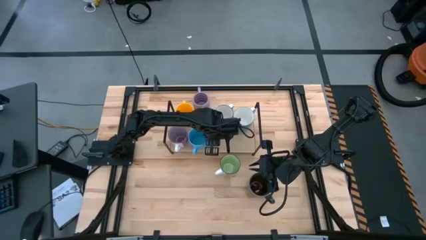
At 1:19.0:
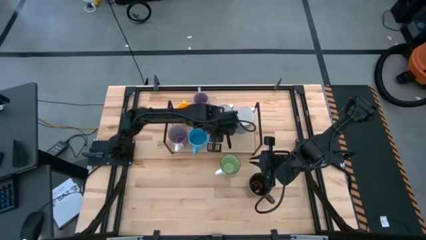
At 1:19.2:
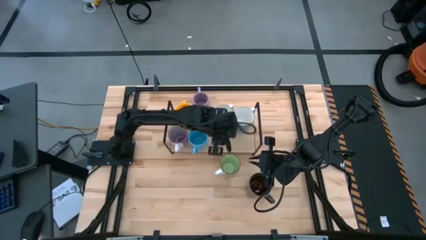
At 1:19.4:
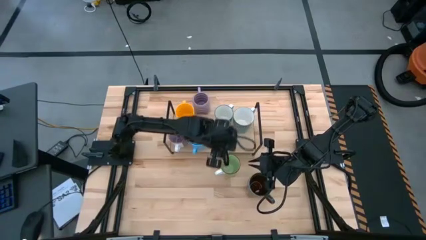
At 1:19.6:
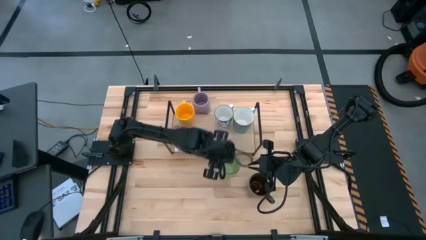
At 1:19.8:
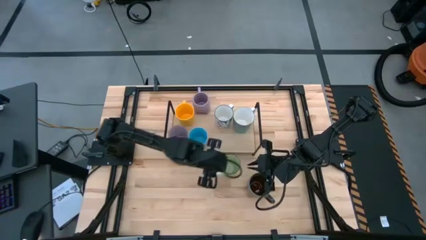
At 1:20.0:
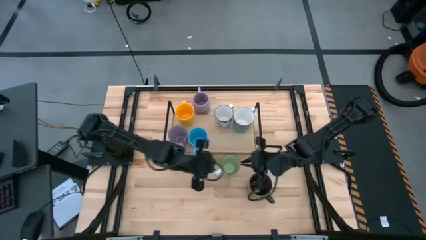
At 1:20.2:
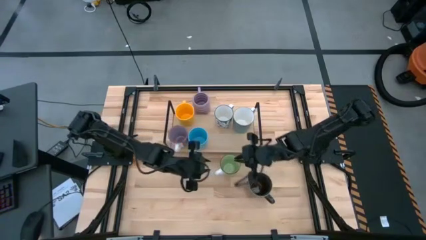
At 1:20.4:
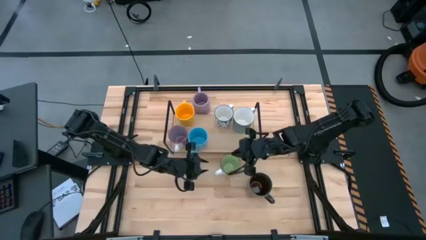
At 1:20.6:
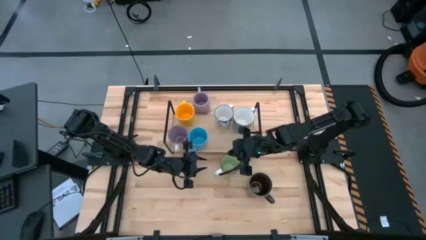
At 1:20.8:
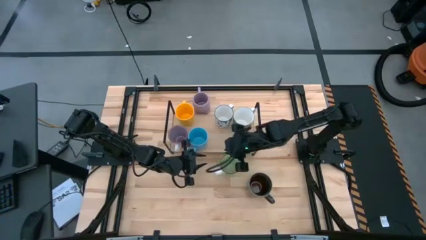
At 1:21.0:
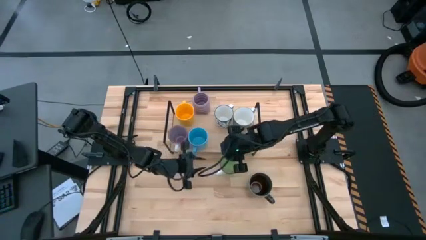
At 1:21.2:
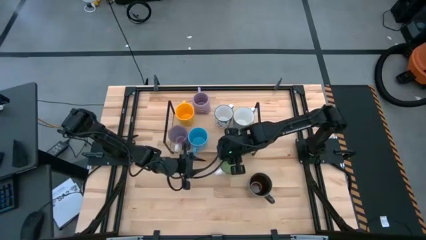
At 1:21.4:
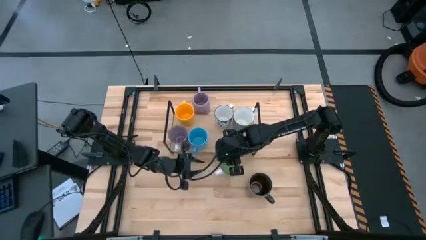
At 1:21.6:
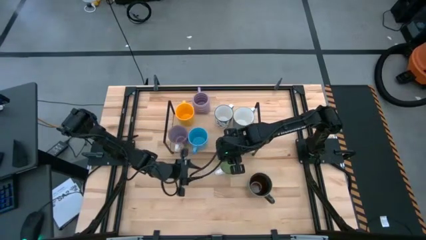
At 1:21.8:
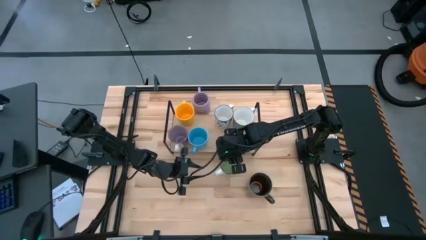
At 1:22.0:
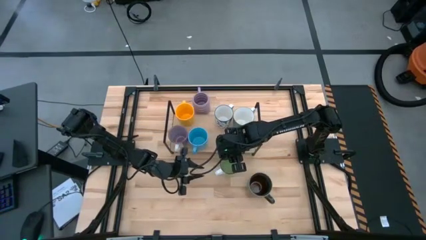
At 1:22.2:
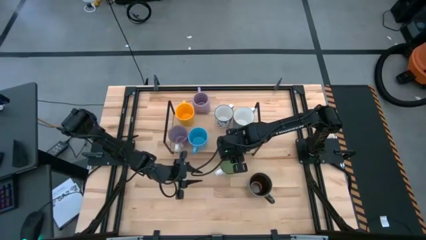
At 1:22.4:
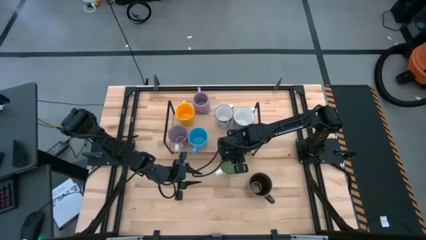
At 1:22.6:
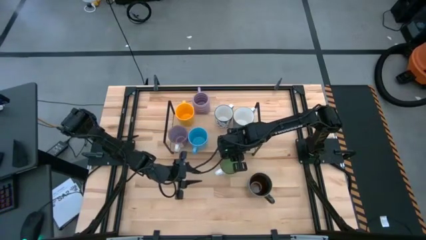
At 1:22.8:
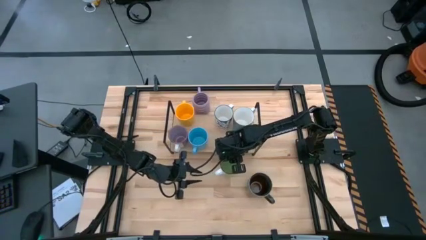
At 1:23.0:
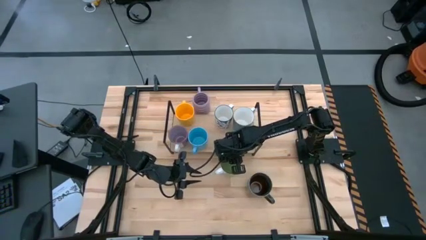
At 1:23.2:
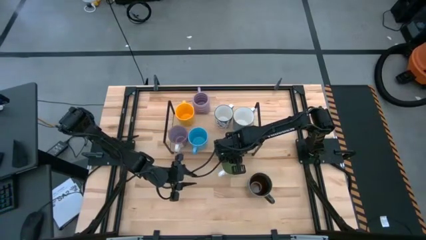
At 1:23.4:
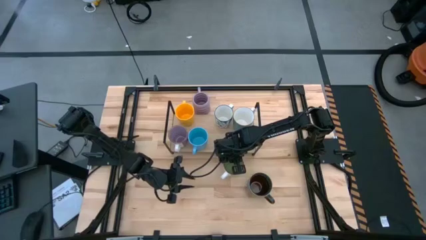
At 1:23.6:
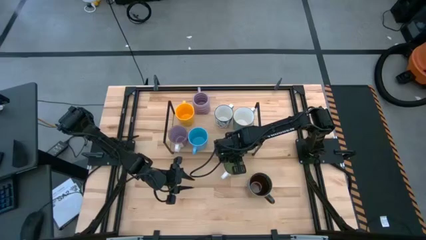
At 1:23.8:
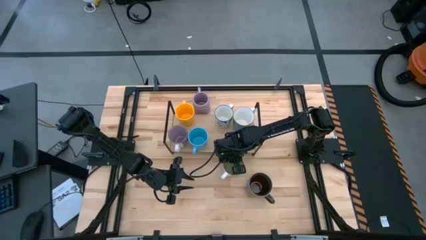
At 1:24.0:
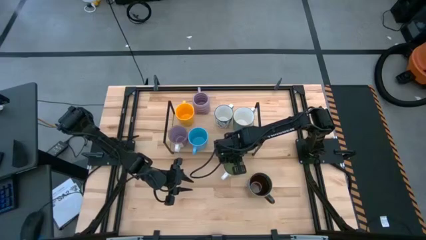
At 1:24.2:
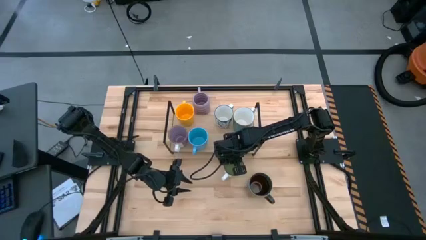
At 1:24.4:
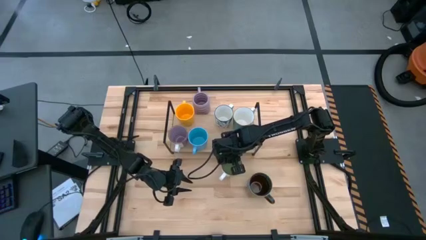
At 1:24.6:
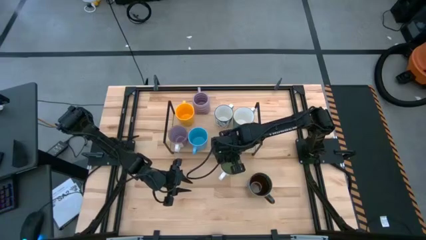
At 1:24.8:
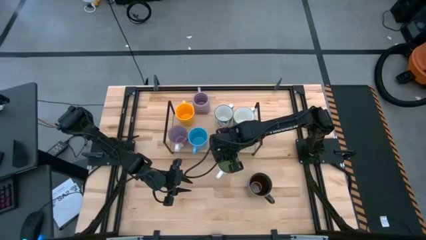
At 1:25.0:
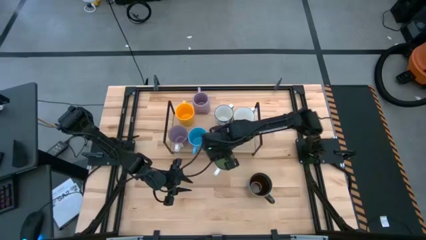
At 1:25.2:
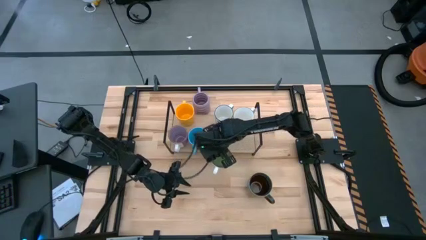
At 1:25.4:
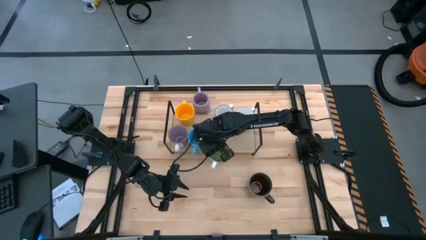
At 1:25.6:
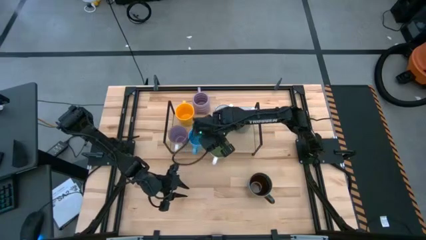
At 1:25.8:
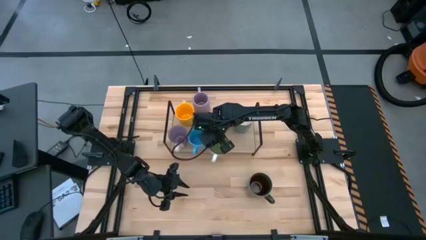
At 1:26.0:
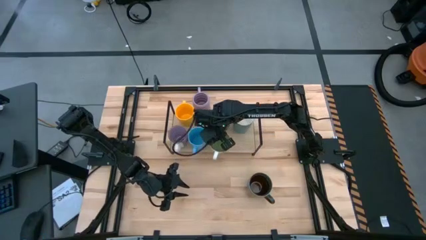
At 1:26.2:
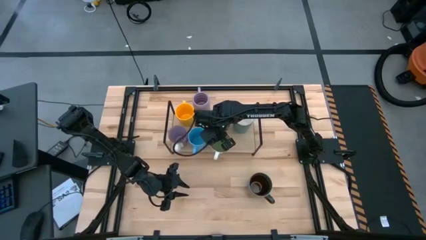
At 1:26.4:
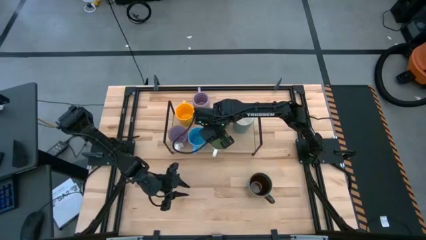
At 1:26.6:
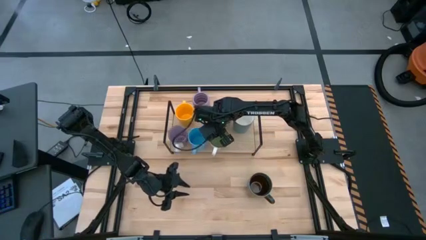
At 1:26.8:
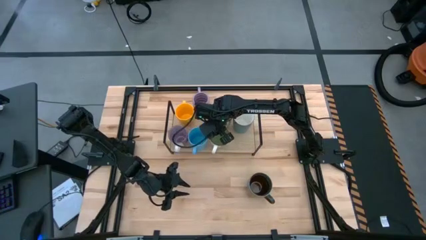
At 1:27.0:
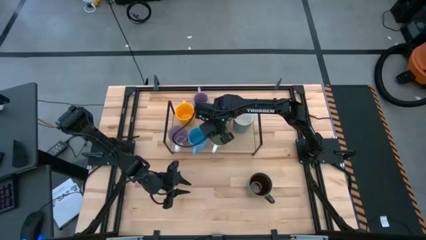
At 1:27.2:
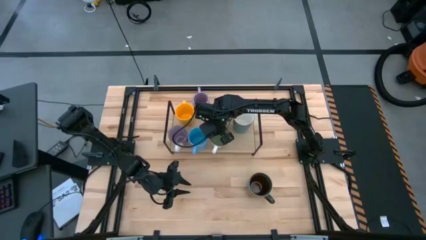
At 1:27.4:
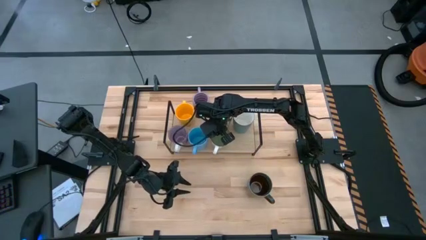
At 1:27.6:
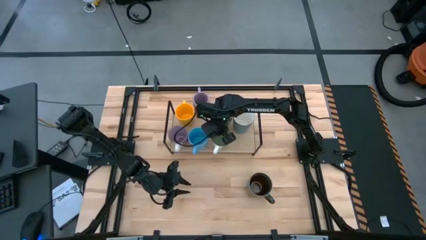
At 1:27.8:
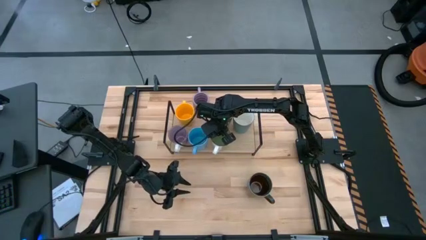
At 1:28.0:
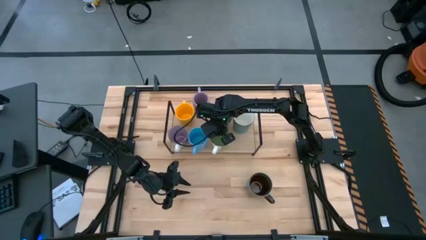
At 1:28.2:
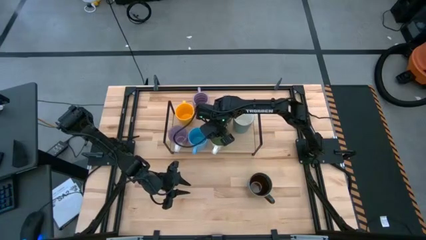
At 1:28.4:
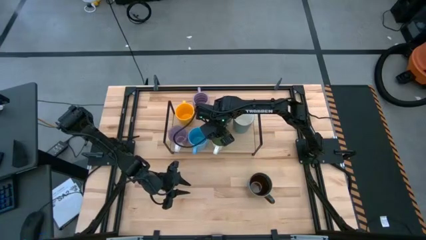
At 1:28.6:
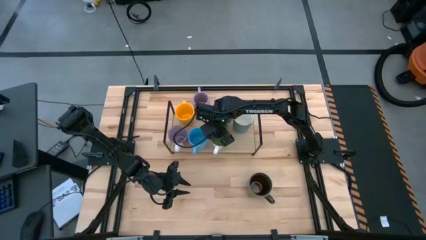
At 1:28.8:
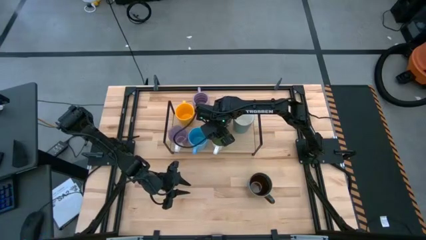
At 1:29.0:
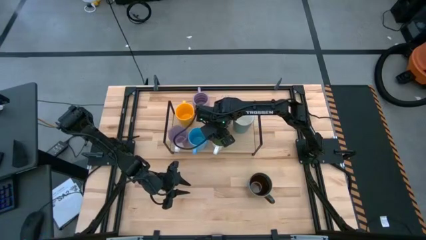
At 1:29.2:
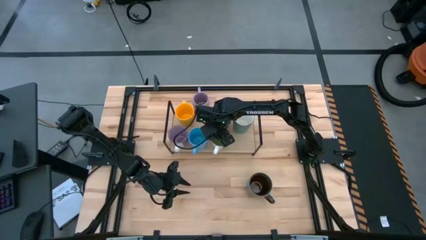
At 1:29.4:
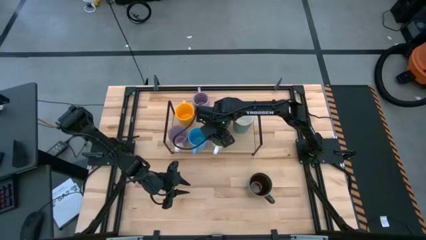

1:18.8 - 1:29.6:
Task: Place coffee mugs
Put the green mug on the shelf

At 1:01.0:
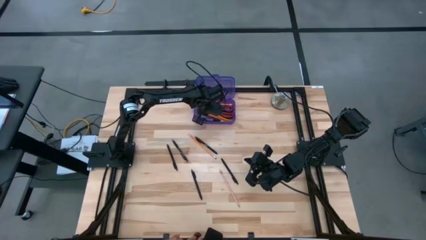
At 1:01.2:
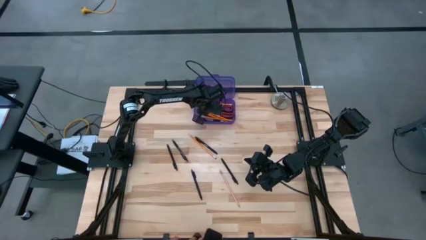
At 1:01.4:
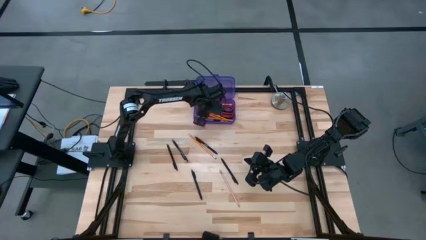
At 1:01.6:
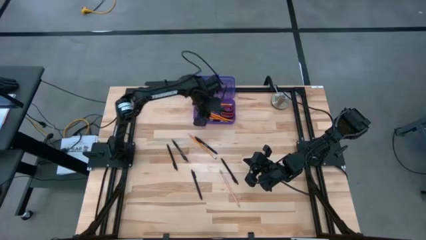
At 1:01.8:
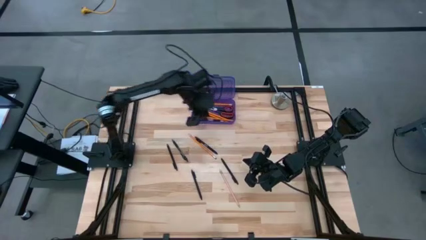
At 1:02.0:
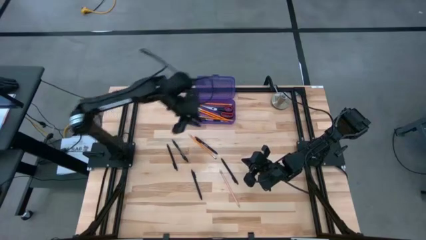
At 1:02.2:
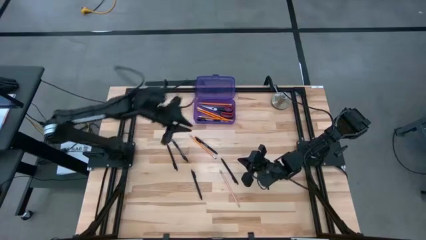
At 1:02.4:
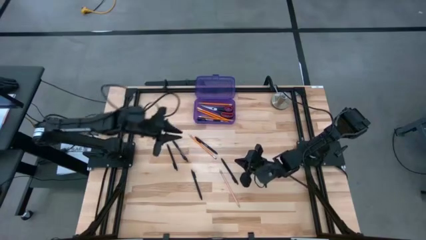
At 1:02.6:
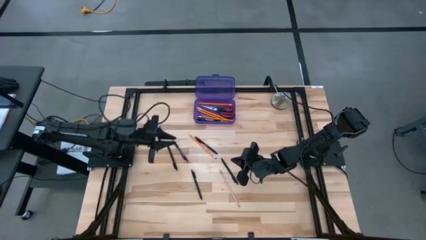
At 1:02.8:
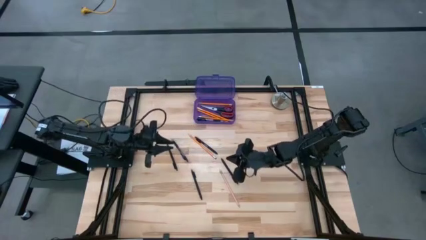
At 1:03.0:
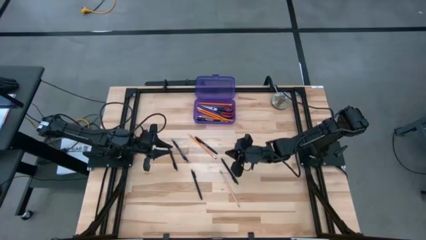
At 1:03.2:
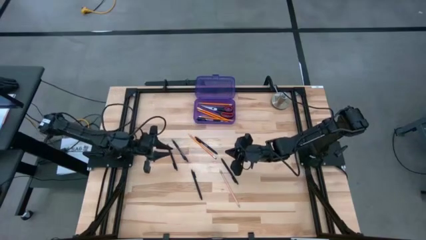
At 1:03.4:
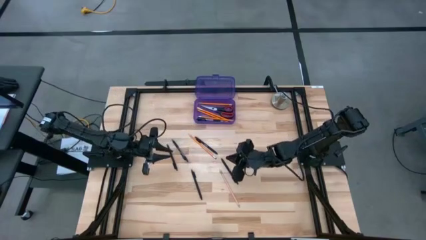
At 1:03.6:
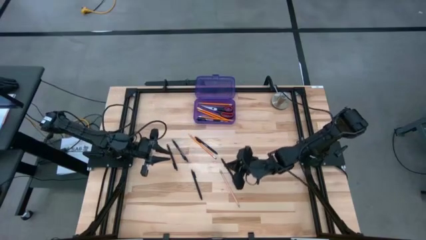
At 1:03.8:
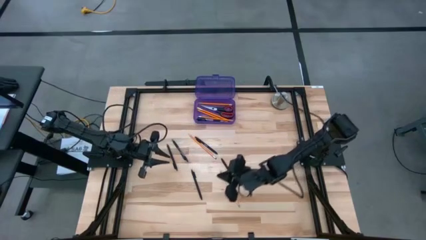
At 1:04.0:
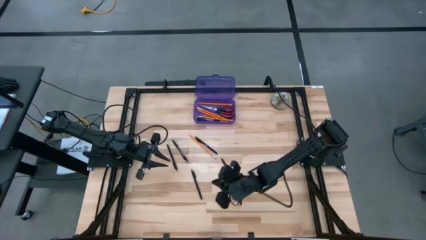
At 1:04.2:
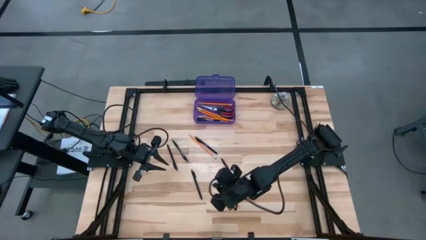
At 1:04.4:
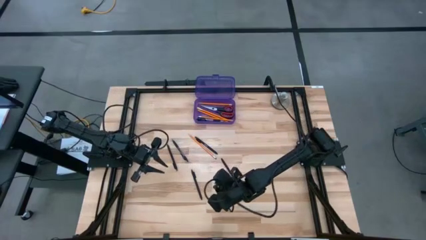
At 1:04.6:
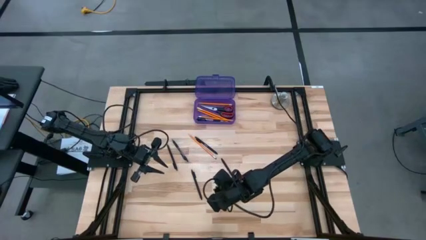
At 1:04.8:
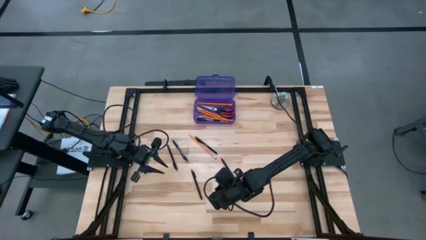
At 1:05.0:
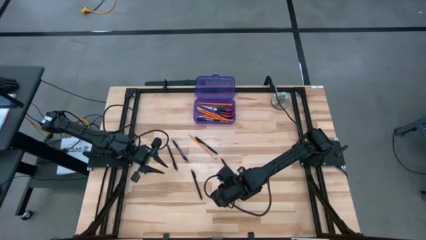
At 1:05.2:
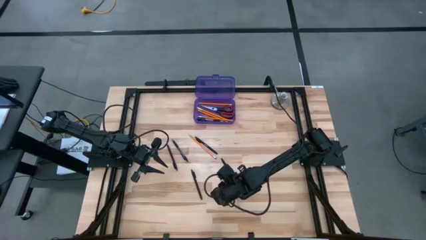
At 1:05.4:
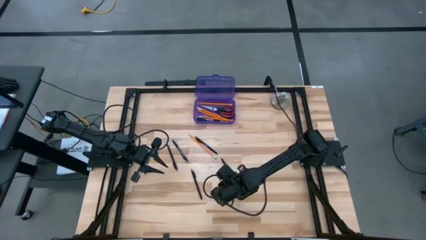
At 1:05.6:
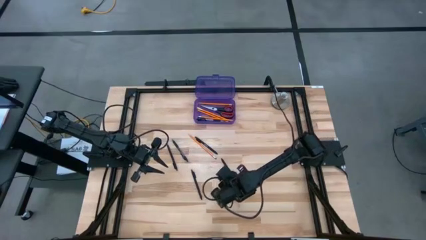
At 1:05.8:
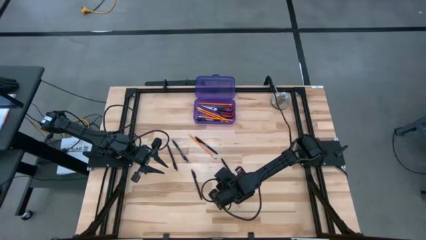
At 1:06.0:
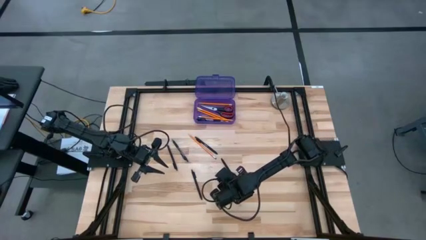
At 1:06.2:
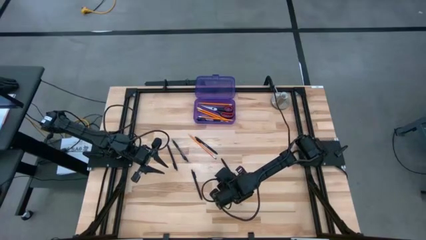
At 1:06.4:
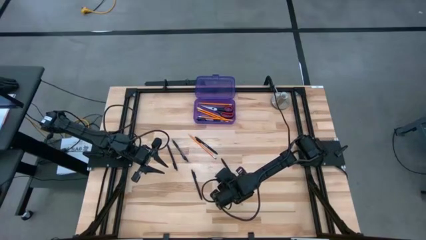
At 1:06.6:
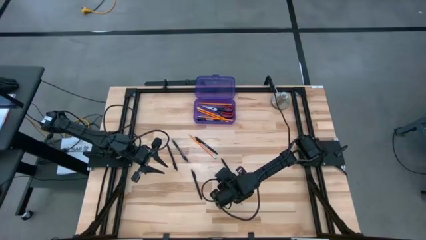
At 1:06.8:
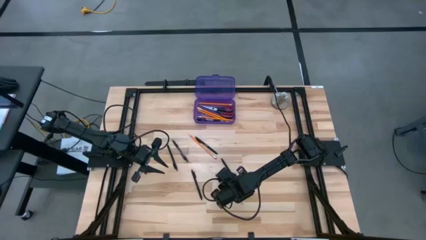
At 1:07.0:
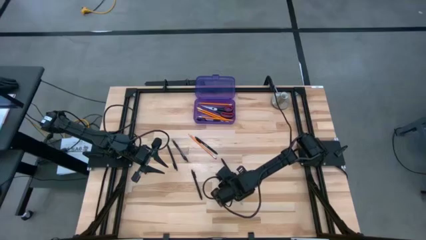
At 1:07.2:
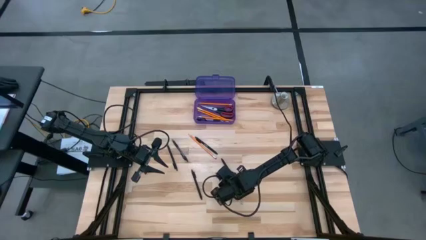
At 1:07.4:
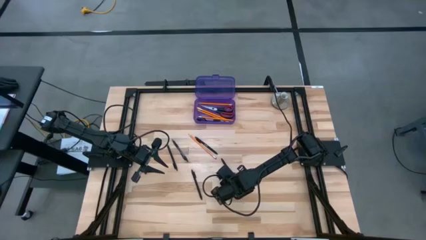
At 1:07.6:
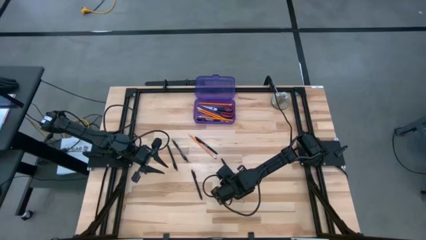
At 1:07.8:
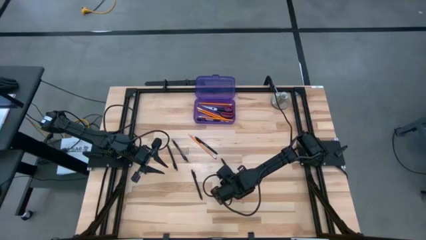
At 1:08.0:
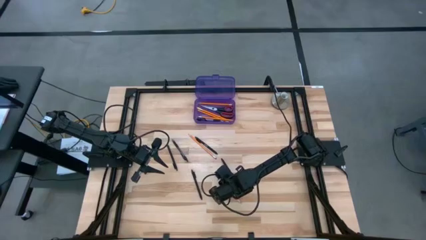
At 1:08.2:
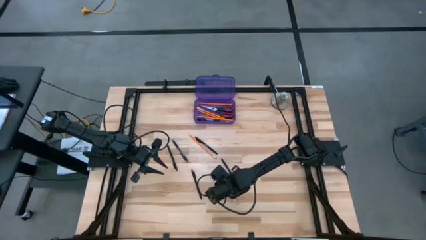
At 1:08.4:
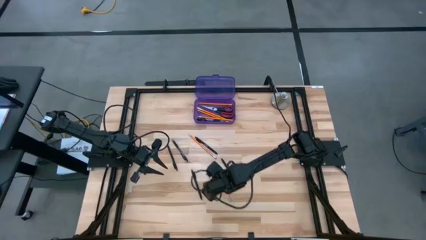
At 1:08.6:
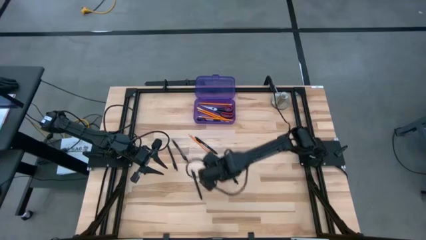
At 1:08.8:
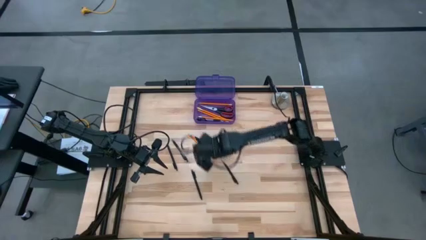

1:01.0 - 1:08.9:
Task: Pick & place school supplies into a supply box
Put the brown pencil into the violet supply box
